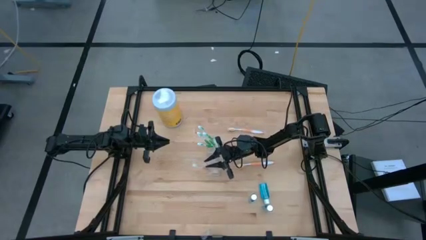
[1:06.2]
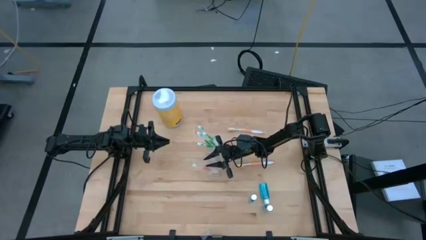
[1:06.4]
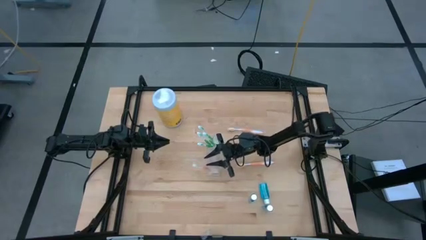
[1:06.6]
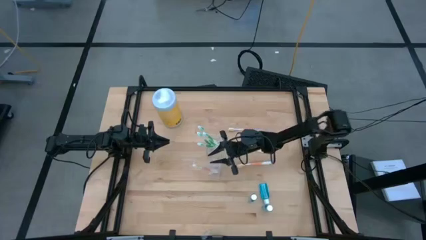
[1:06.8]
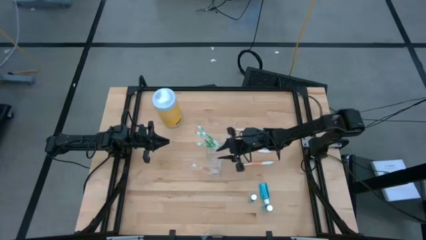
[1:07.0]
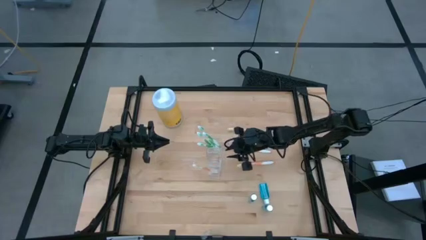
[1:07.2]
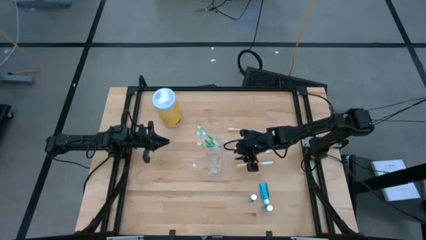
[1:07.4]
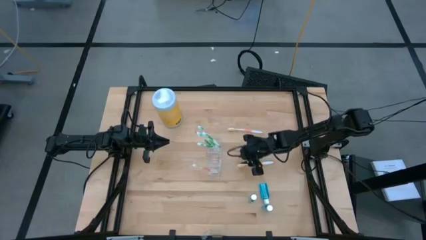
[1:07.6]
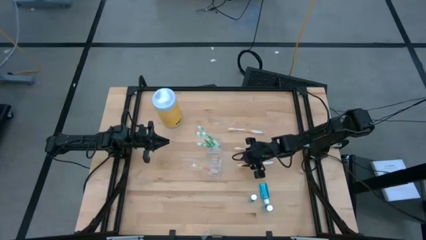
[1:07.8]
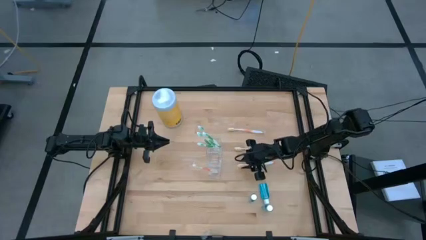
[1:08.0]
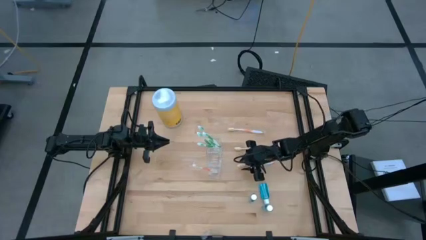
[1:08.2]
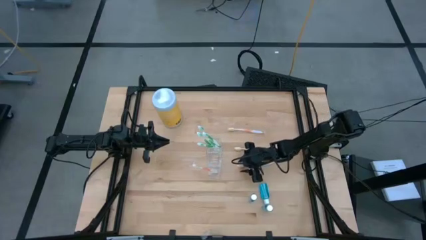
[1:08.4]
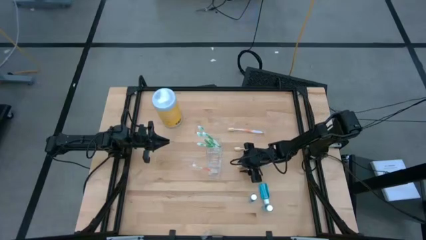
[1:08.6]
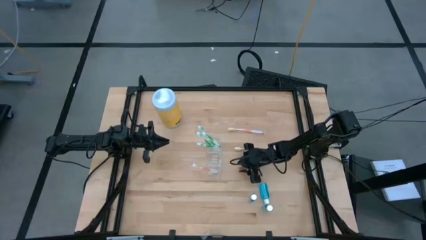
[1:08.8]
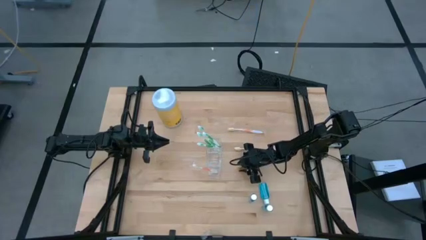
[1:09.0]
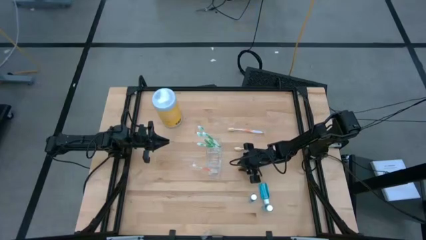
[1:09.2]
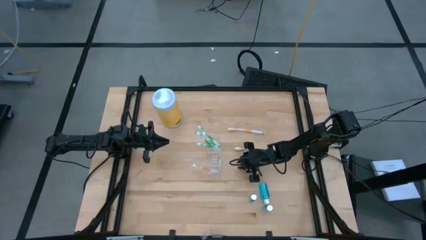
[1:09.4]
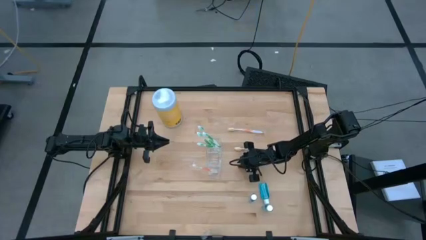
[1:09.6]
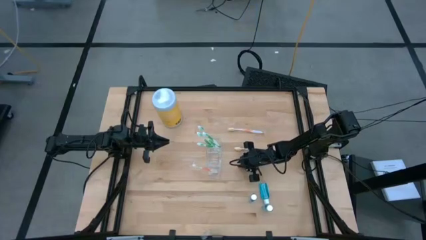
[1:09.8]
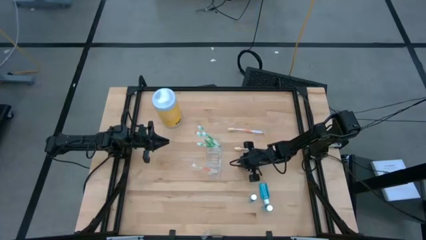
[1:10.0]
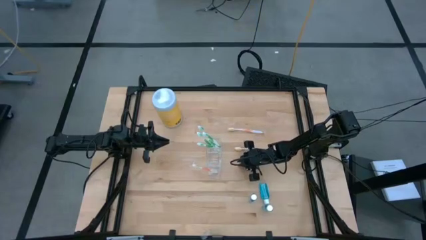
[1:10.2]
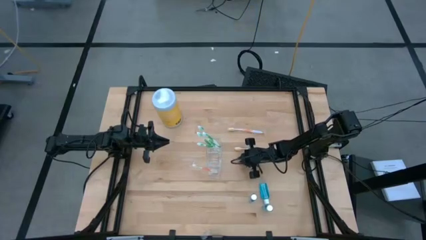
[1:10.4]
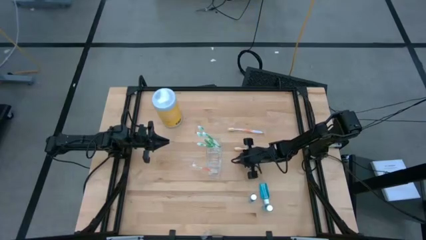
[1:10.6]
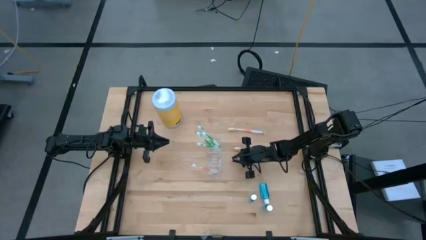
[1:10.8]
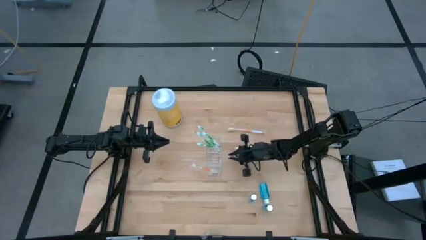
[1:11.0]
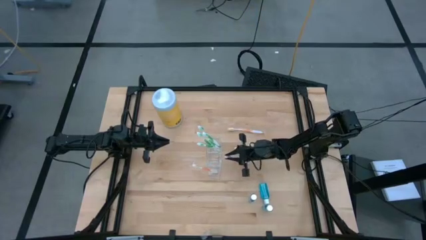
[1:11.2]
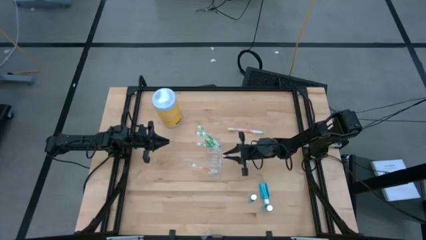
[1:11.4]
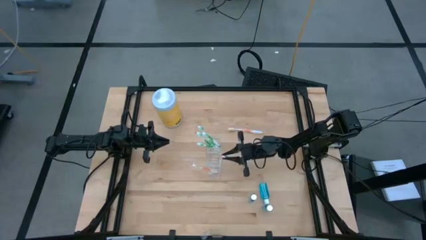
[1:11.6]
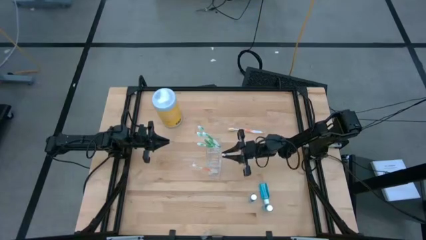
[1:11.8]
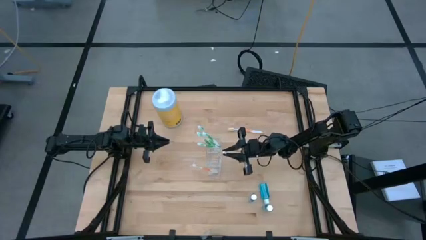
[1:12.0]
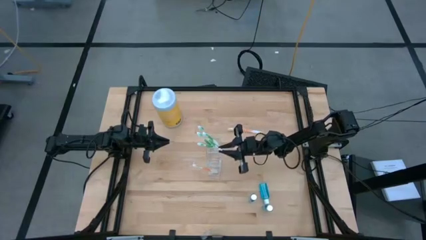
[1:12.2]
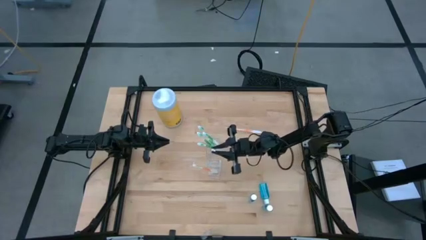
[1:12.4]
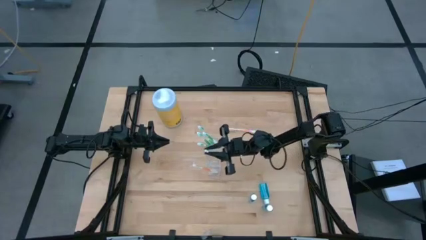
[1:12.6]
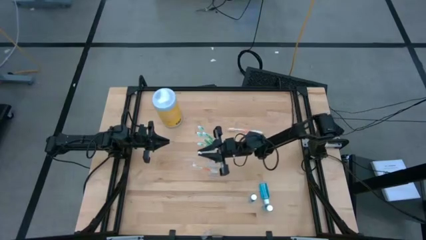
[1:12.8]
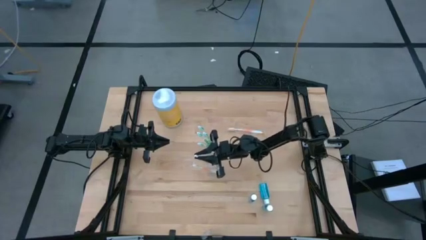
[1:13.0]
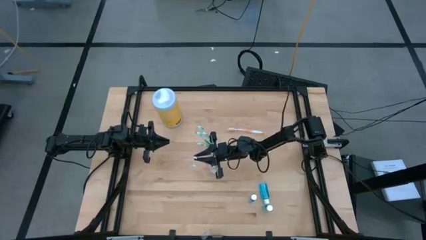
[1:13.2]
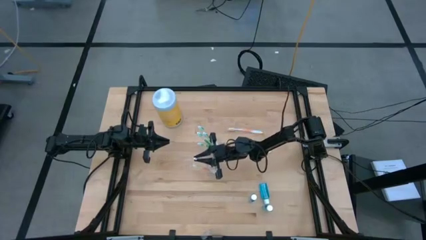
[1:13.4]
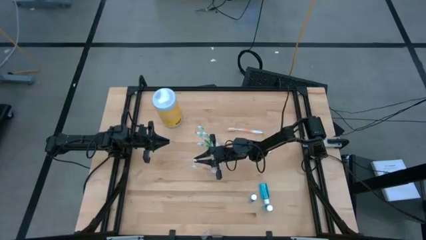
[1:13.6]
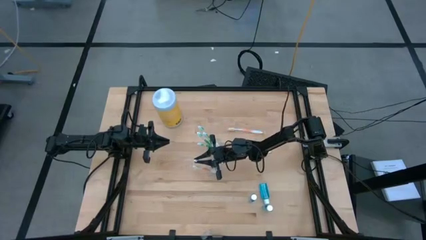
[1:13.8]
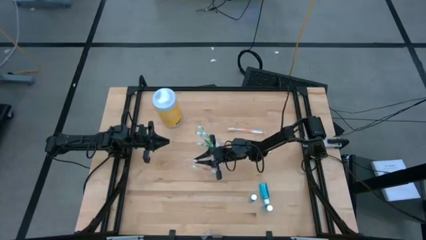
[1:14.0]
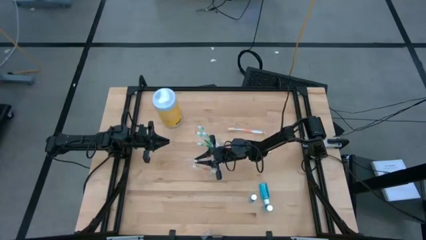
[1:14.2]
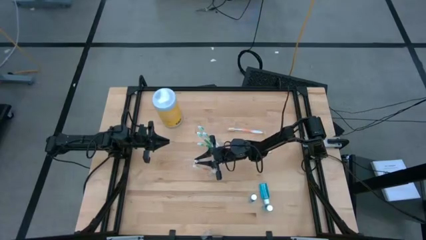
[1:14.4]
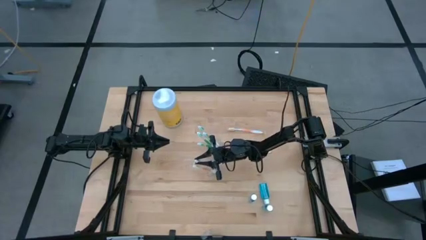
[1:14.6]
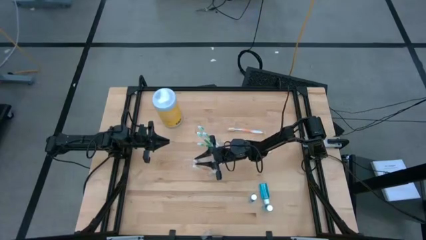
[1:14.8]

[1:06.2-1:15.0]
Task: Pick & Place toothbrushing station
Put the orange toothbrush into the transparent organizer

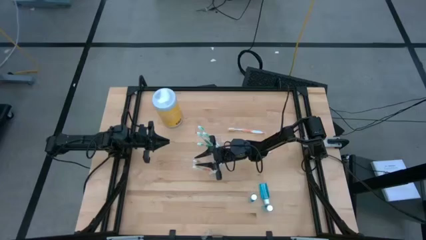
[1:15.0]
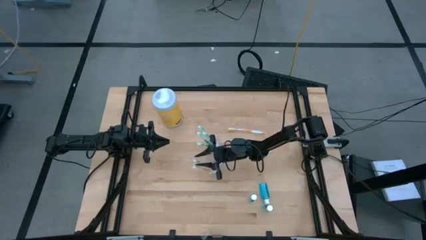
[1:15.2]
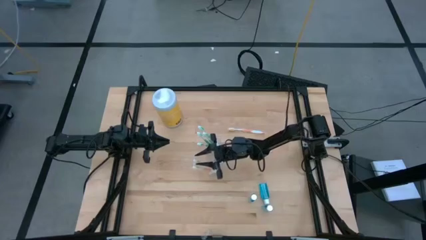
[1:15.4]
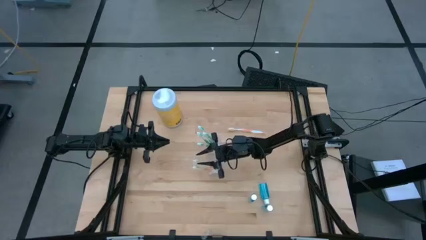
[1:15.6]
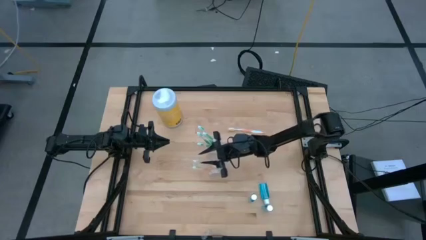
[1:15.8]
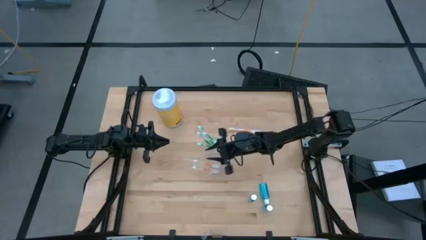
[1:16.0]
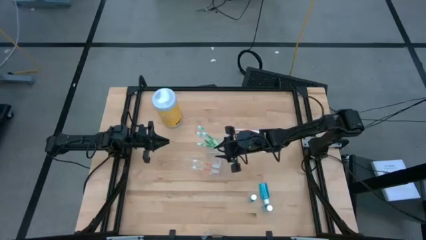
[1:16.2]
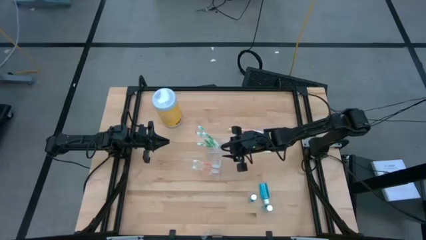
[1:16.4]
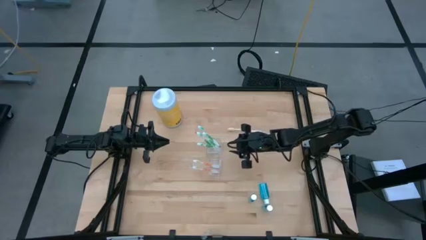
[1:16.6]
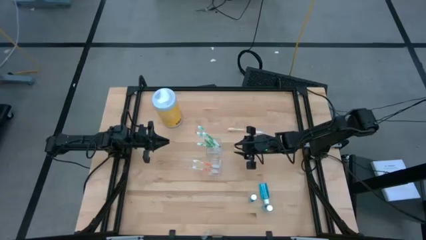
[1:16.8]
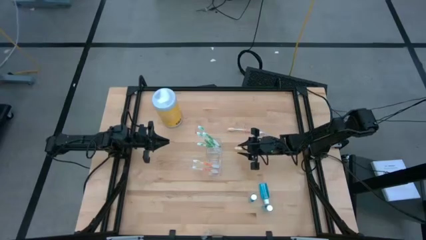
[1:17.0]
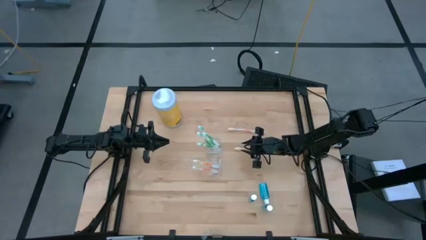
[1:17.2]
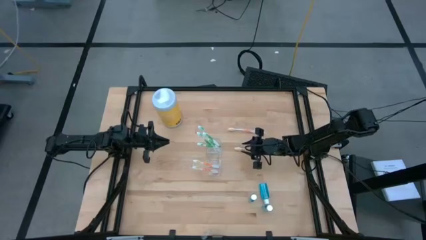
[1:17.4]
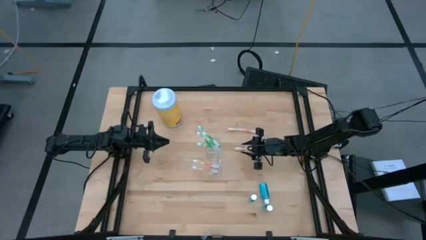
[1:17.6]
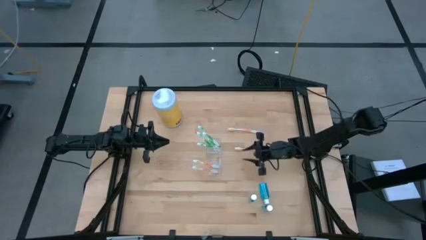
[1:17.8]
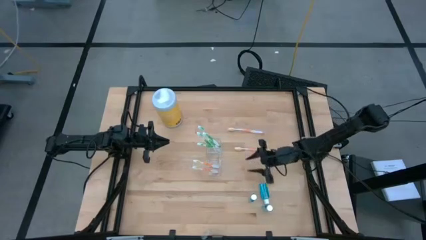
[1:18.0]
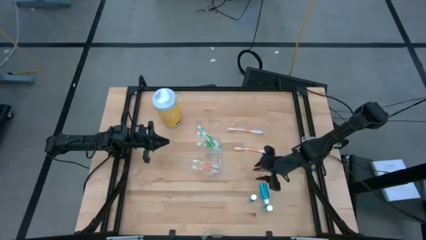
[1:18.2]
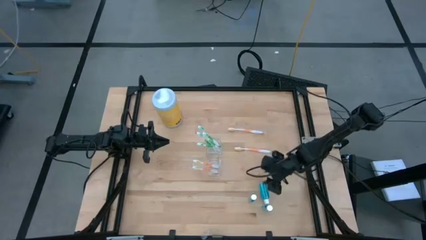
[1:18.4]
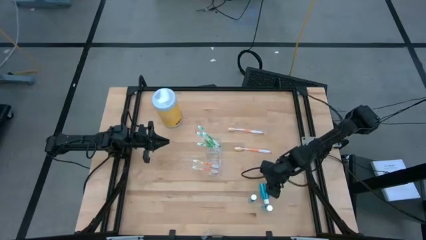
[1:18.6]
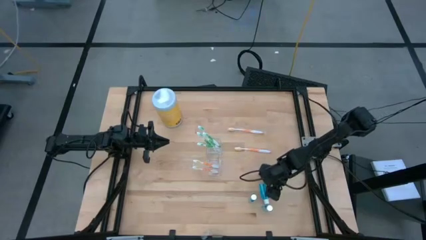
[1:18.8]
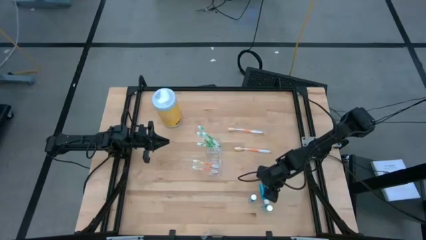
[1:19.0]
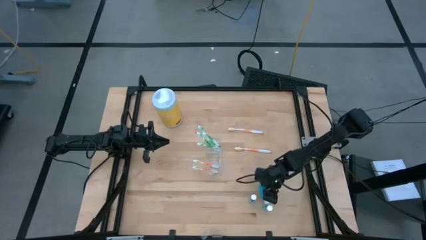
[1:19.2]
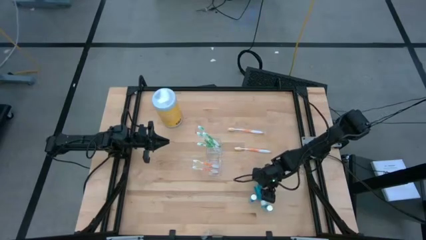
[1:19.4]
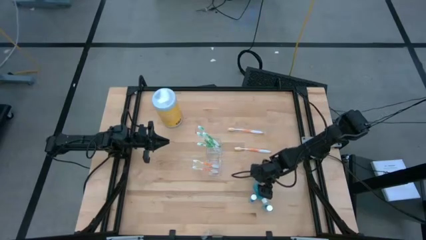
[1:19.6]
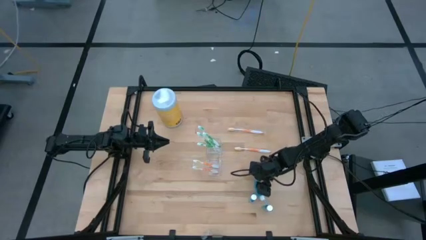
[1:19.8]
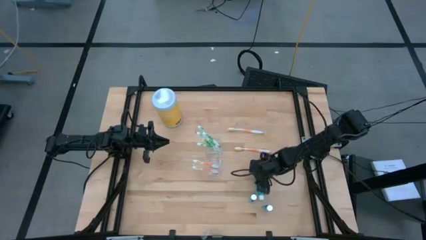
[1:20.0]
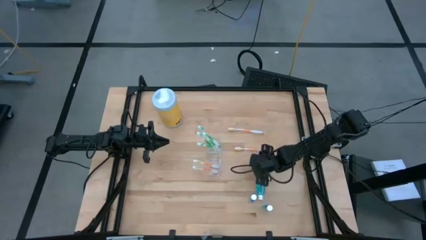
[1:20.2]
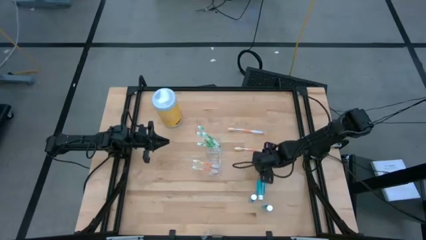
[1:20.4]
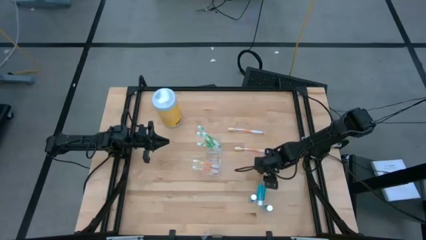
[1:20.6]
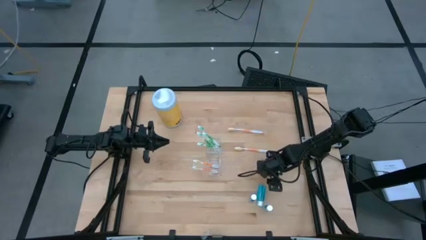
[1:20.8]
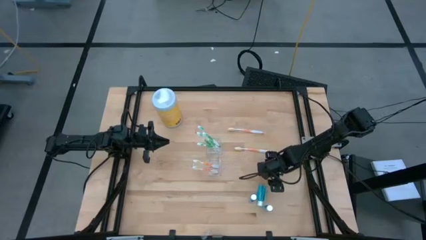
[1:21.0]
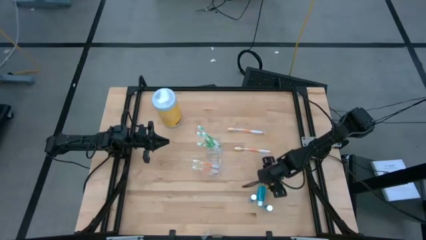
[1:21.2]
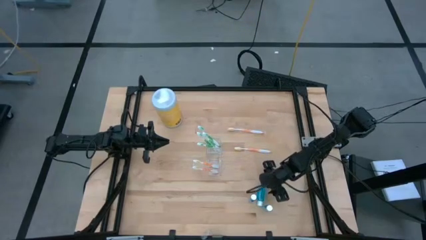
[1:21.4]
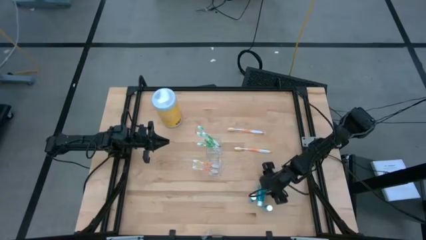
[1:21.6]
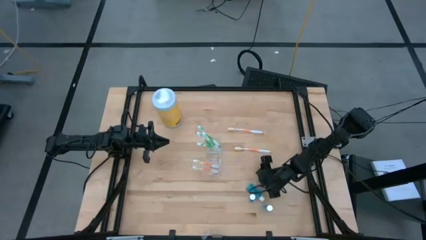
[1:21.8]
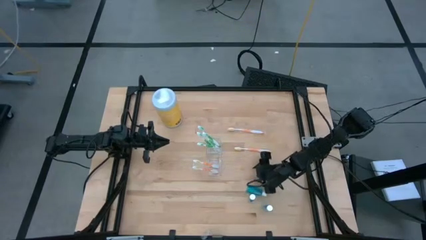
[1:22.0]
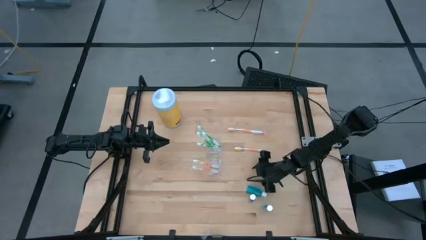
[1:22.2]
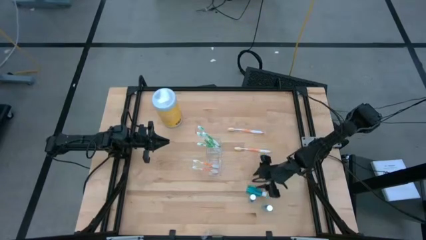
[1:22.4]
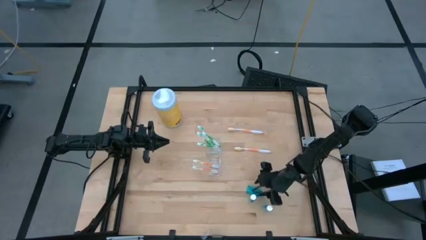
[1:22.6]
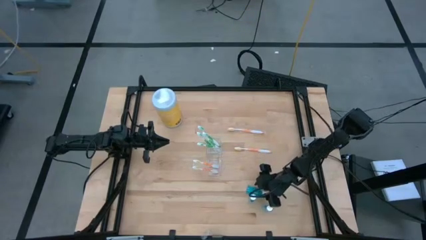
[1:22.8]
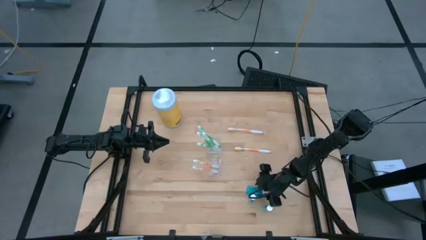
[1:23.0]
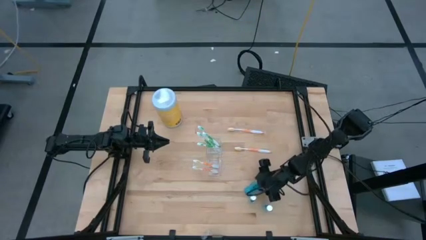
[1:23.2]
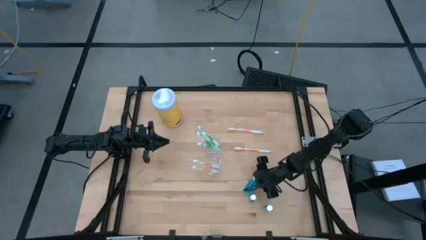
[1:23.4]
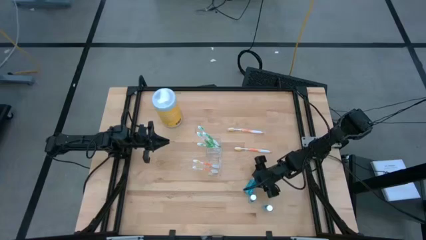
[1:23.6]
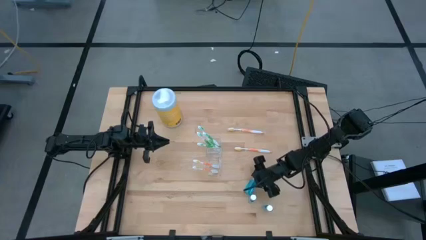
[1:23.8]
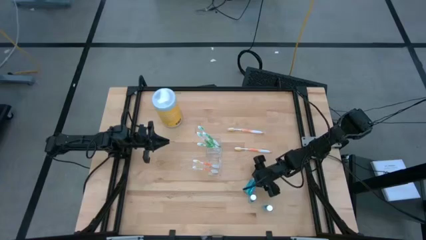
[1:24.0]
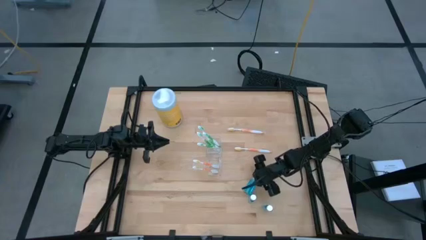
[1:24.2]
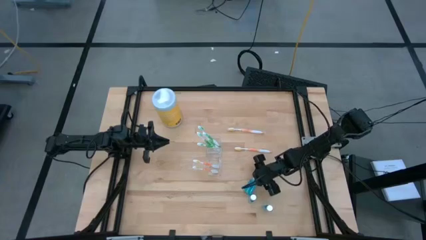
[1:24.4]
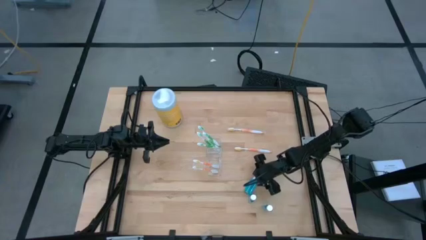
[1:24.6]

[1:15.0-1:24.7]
Put the blue mouthwash bottle into the transparent organizer
